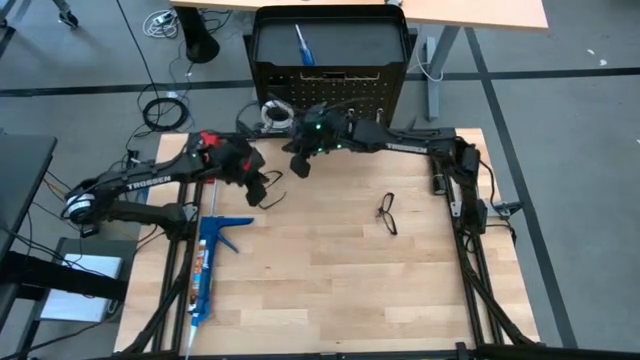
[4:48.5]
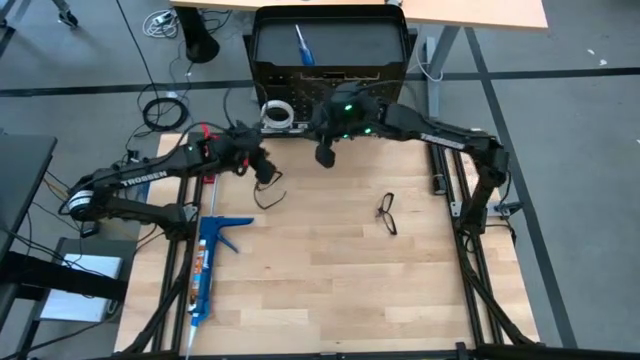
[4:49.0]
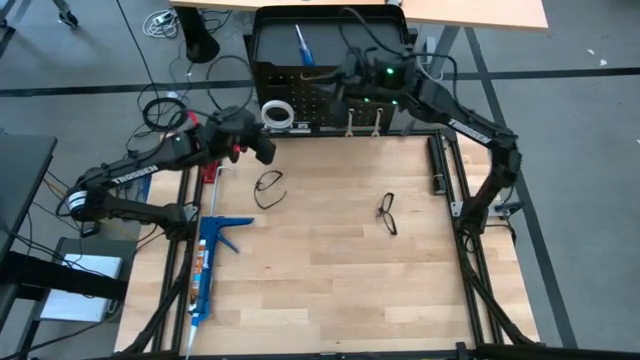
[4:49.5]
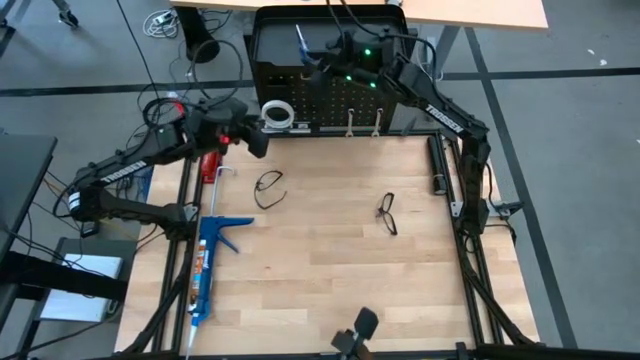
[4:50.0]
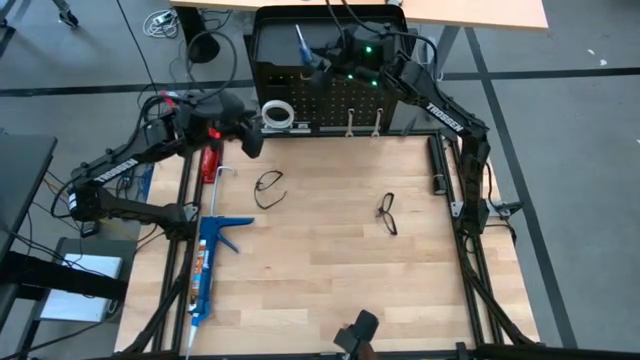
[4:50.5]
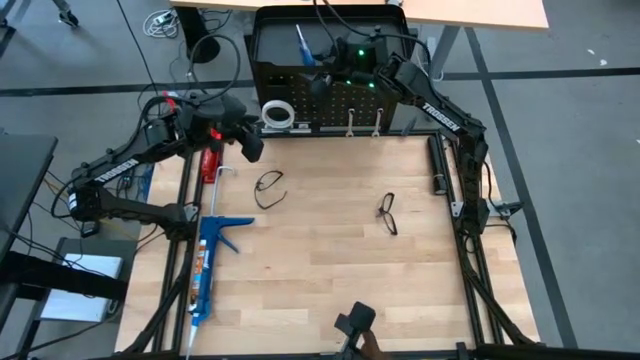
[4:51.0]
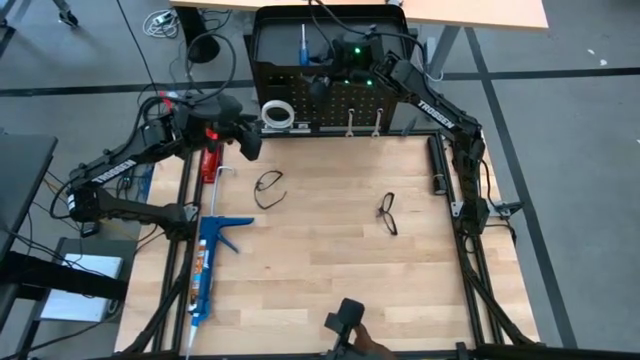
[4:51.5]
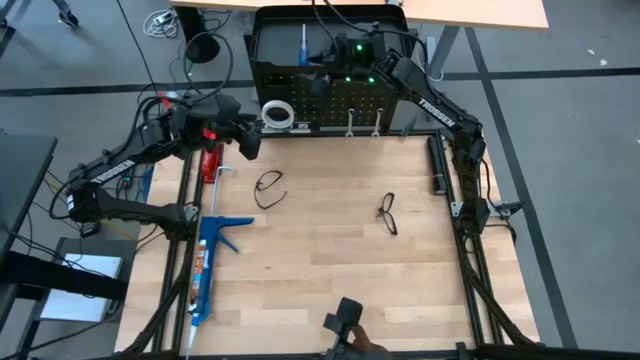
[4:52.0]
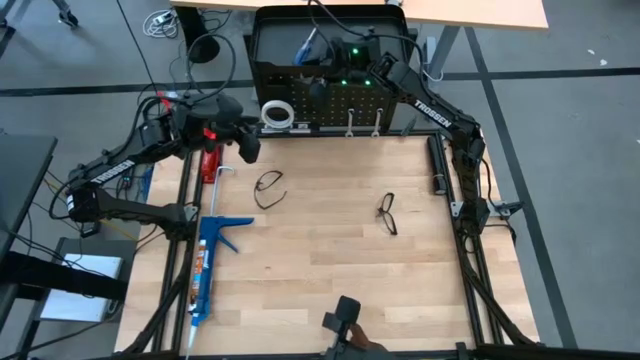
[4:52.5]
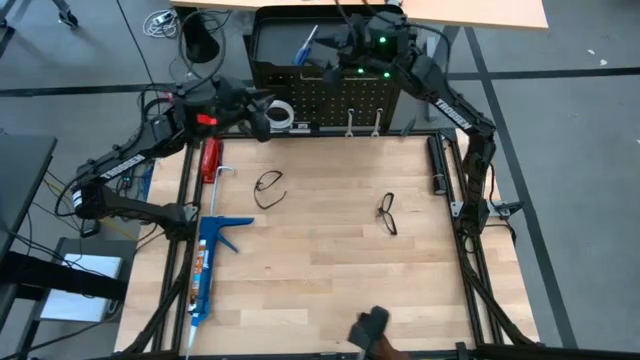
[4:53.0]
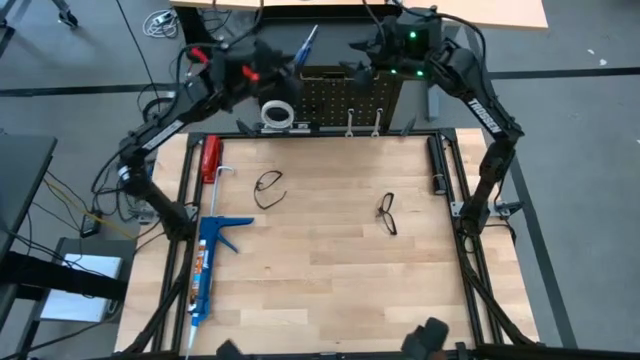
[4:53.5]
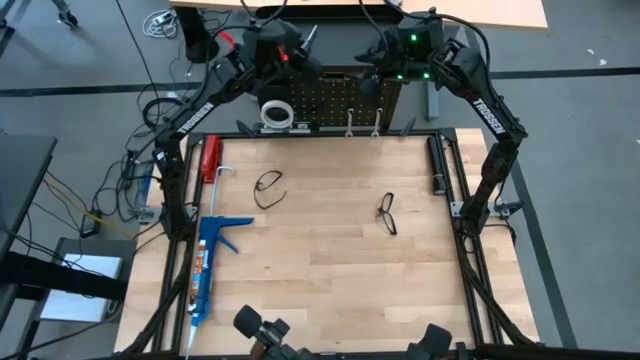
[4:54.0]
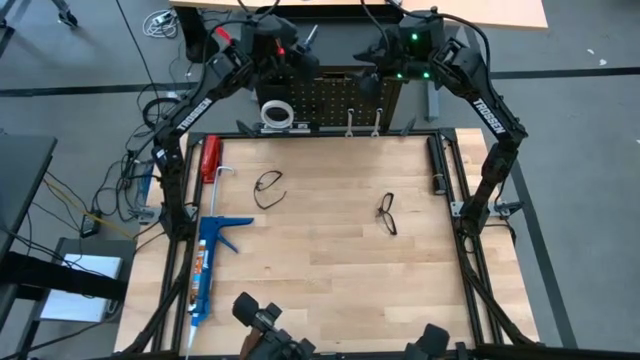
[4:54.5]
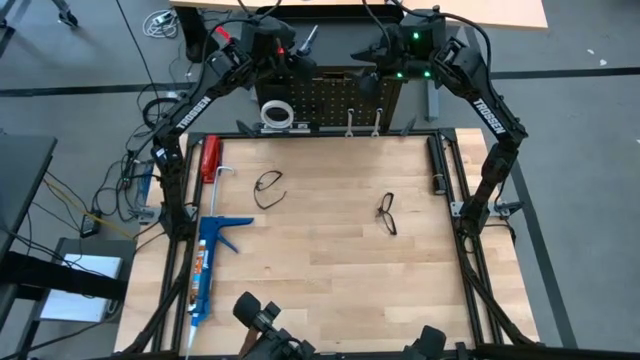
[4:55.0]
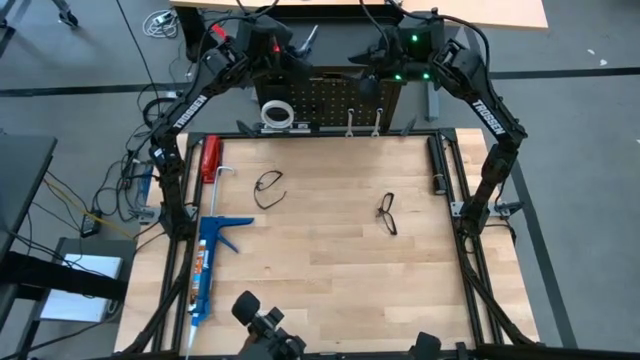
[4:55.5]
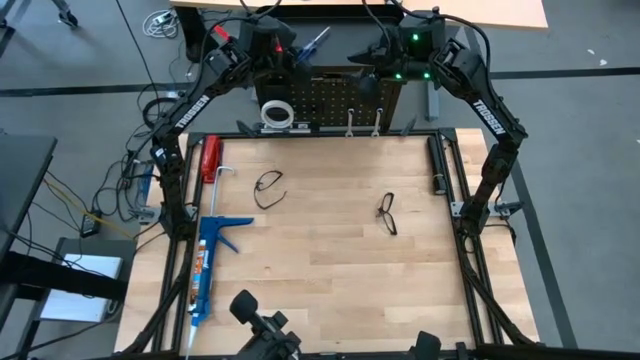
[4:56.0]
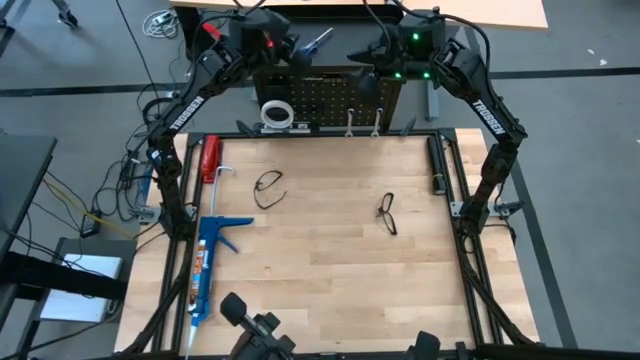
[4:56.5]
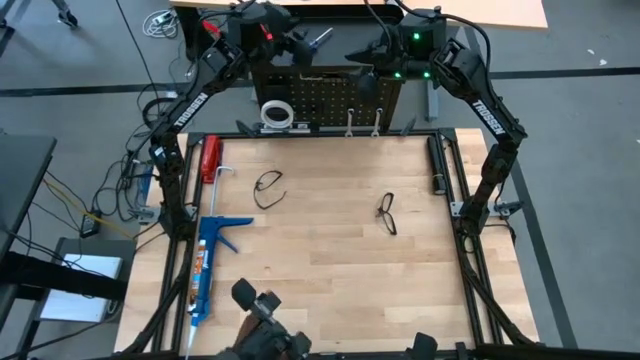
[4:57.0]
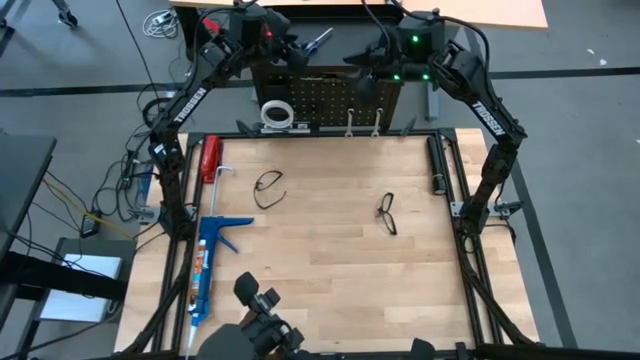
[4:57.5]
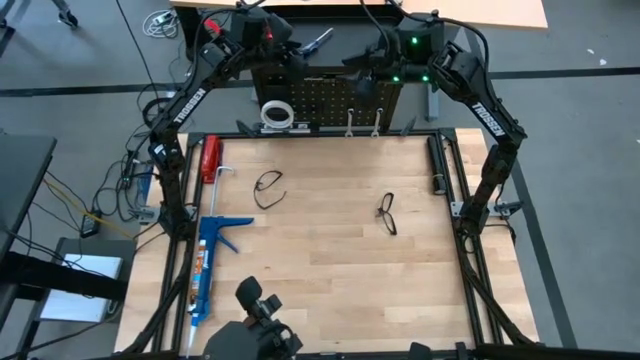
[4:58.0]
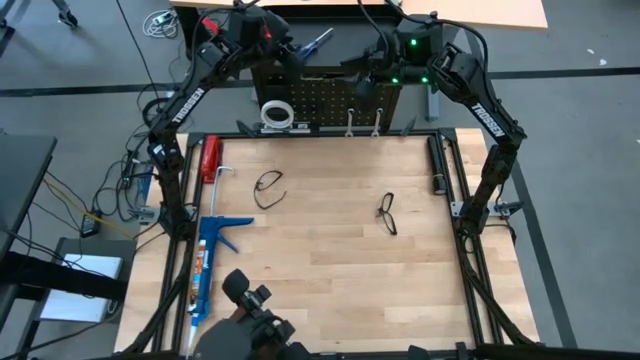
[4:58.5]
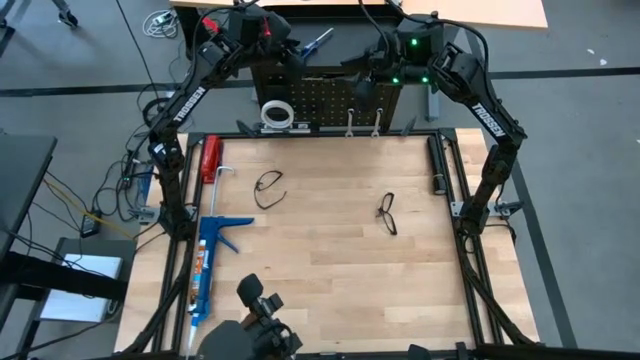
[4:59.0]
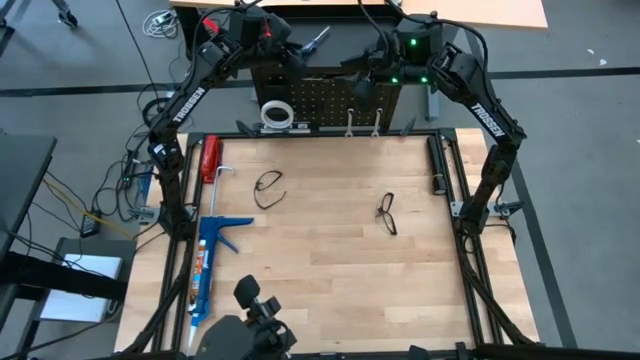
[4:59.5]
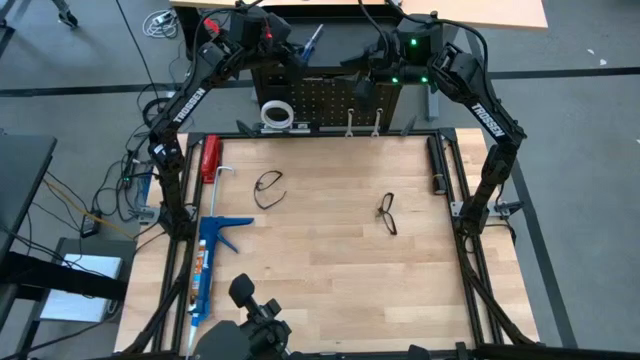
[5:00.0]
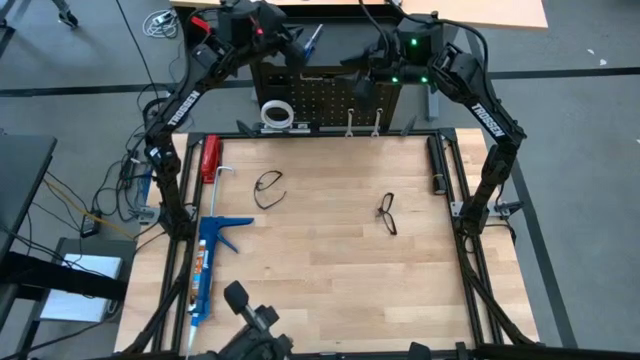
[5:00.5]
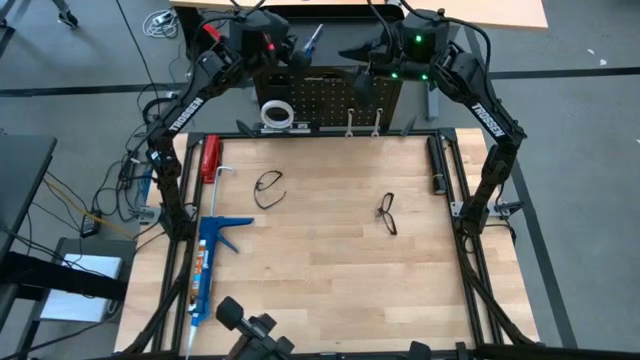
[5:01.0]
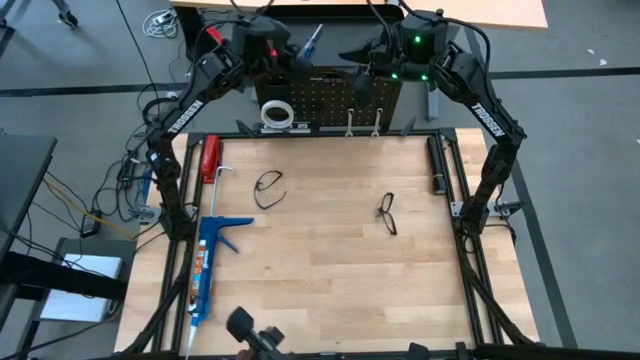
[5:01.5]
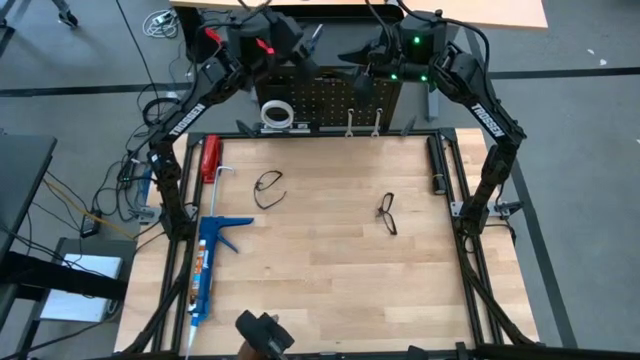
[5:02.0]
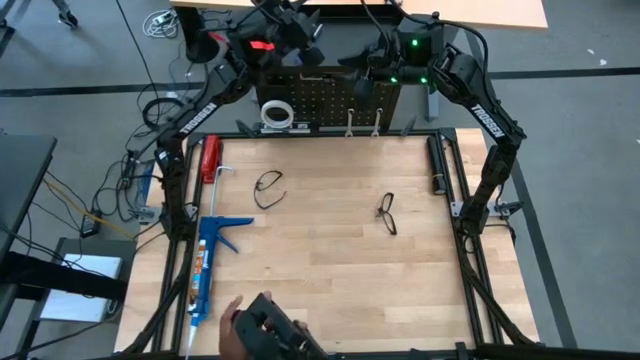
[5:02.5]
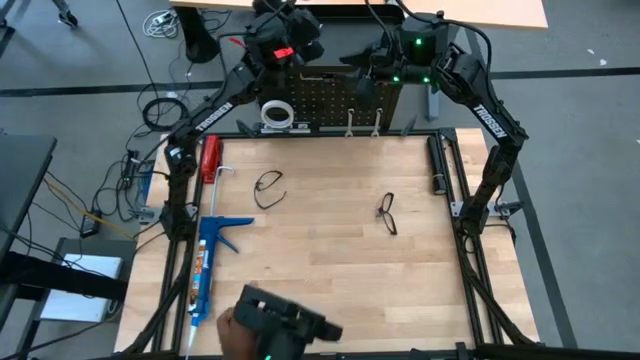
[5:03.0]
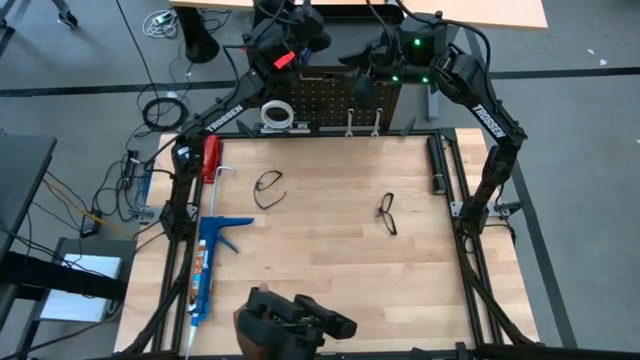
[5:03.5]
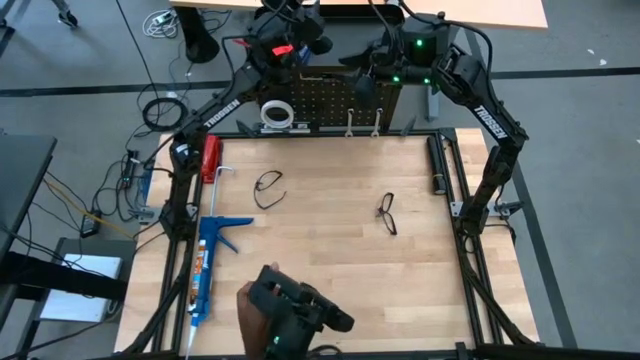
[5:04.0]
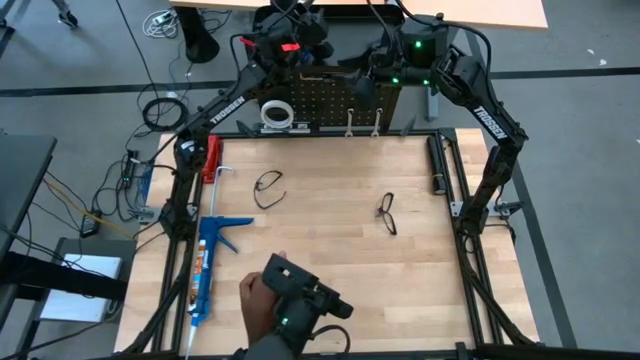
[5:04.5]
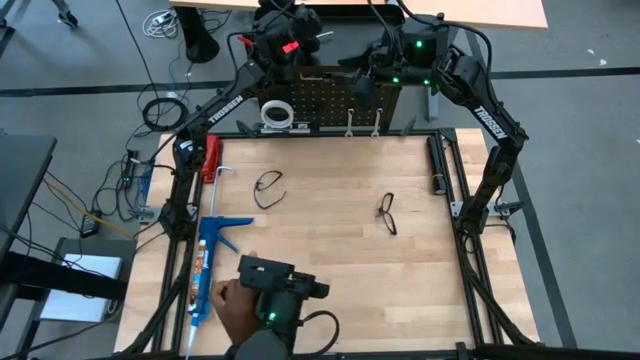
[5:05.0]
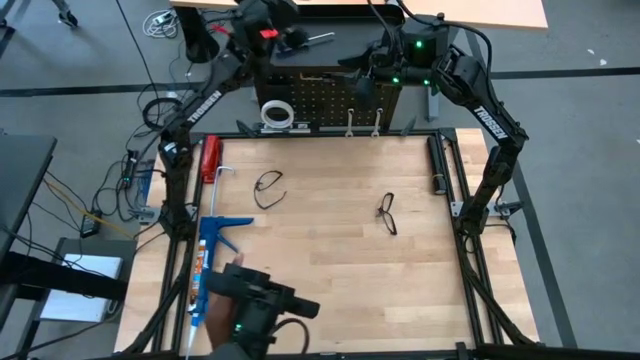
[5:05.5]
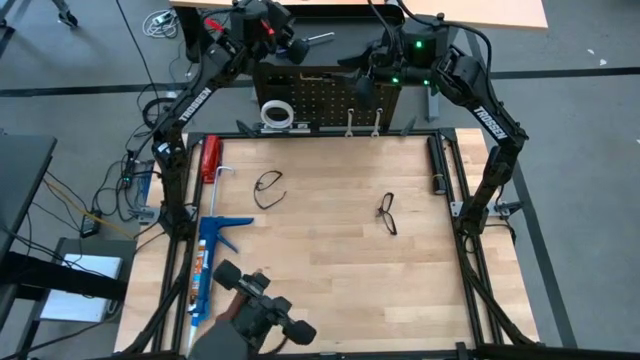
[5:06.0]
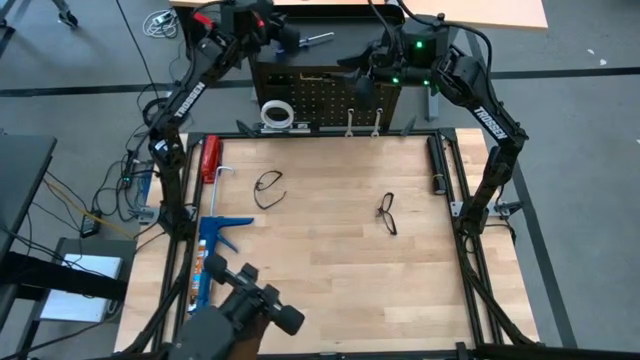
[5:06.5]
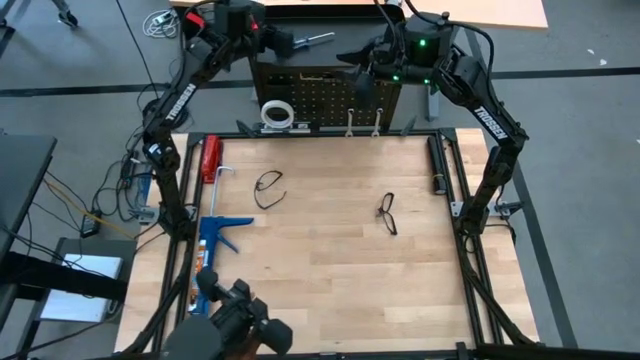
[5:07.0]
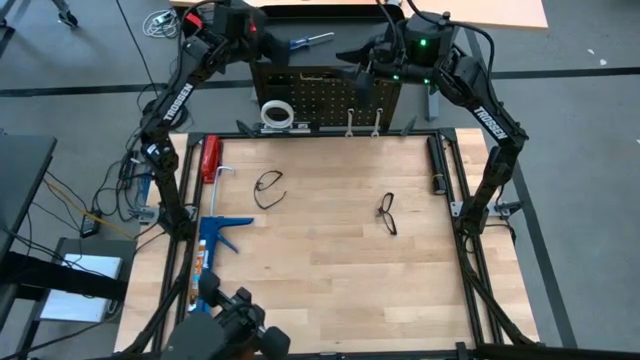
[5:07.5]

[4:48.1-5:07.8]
Task: Hang tools onto peg board
Remove the blue screwdriver from the black pegboard

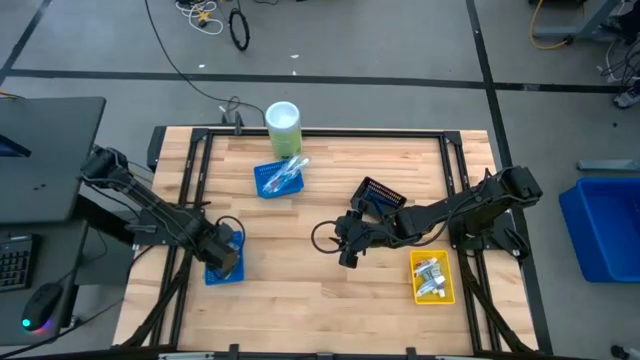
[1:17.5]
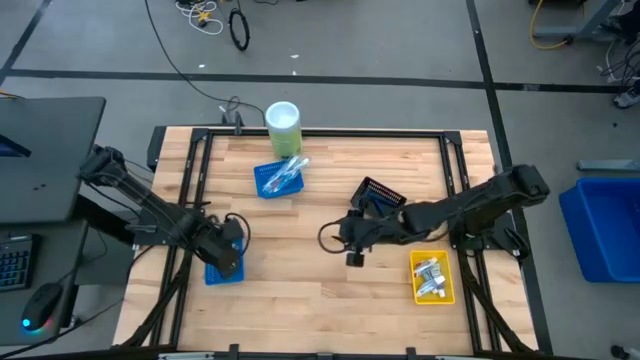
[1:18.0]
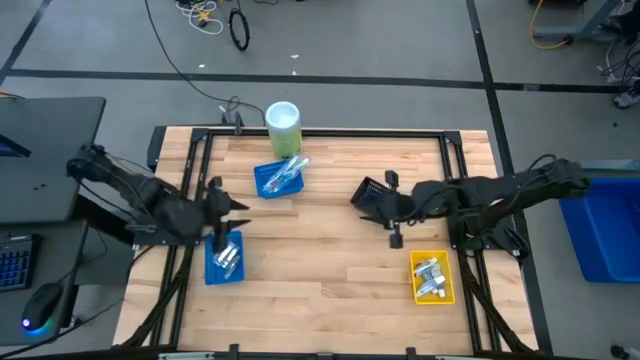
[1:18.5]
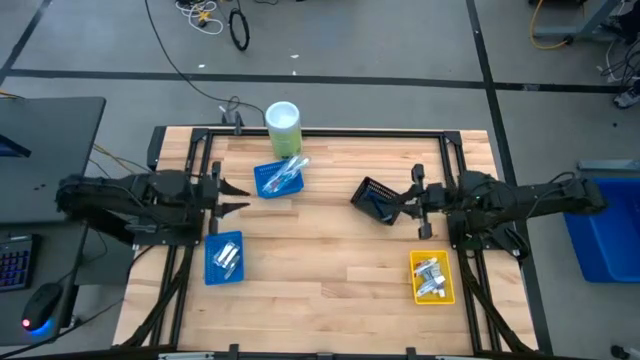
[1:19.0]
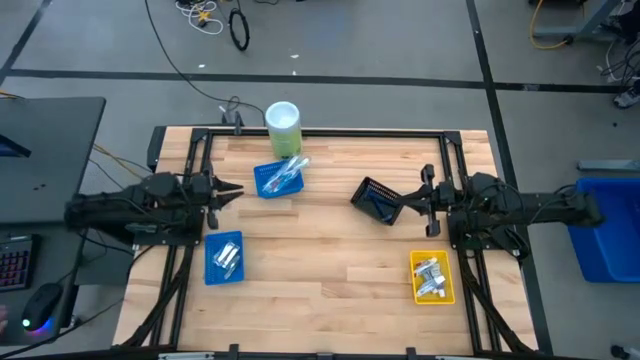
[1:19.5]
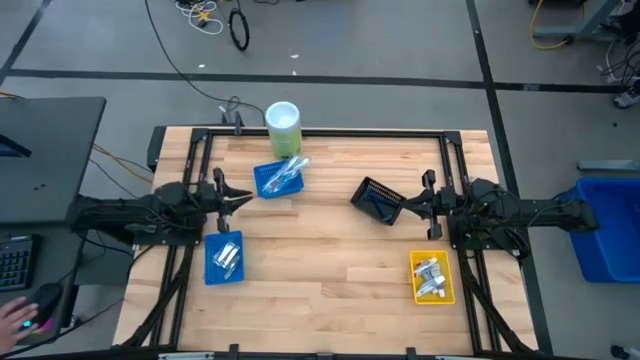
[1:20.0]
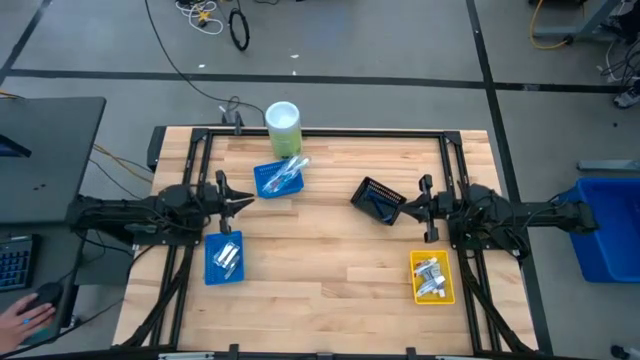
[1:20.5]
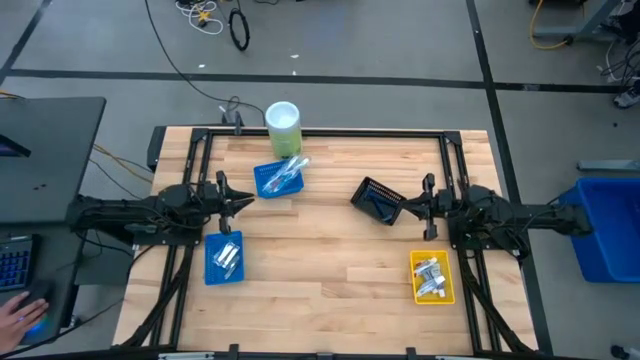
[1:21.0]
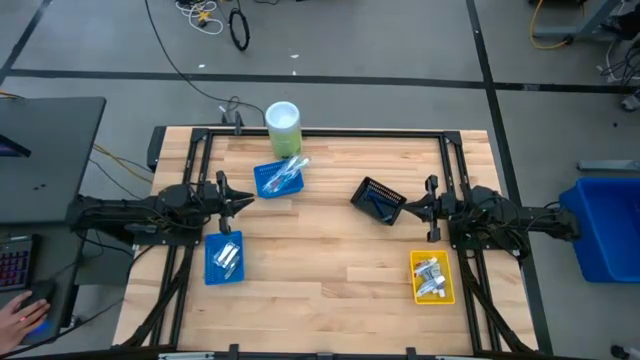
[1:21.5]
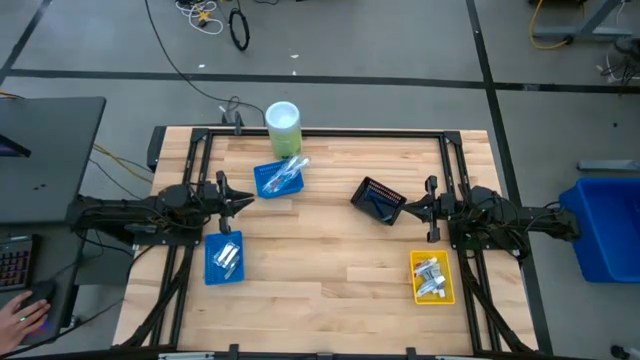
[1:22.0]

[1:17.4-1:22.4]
Task: Pick & Place Travel size toiletries
Return to Home Position
